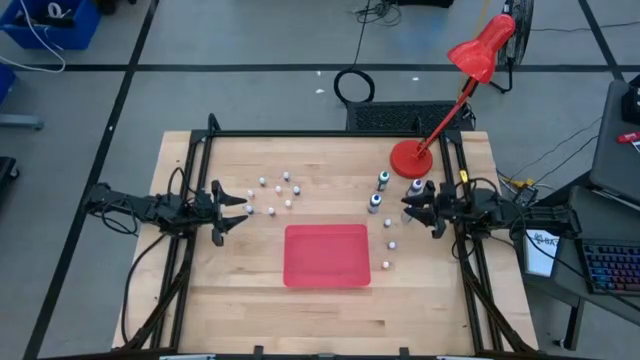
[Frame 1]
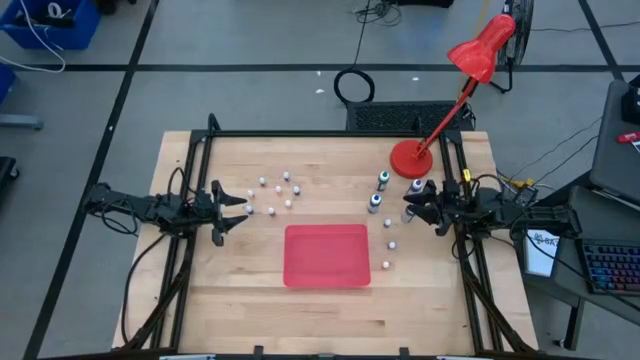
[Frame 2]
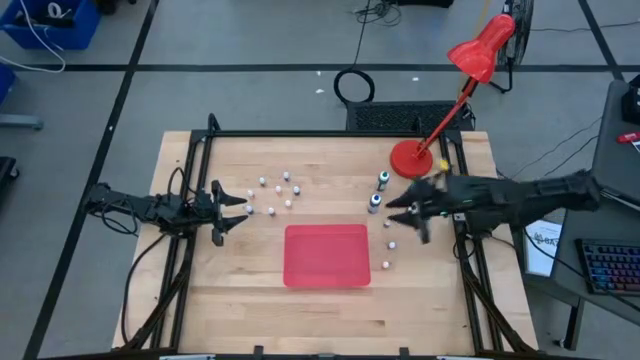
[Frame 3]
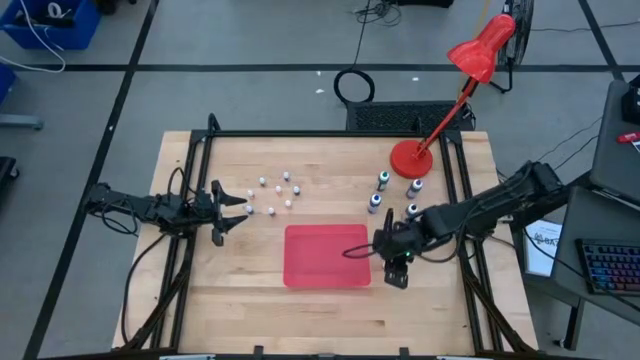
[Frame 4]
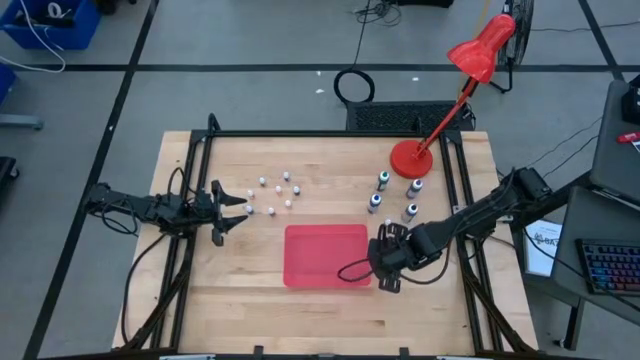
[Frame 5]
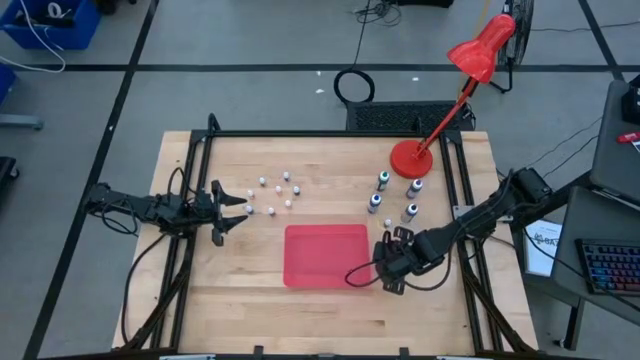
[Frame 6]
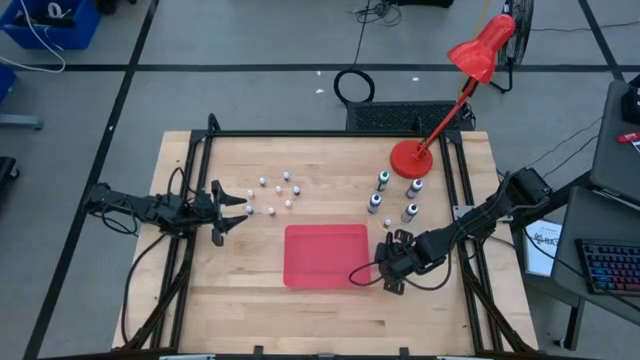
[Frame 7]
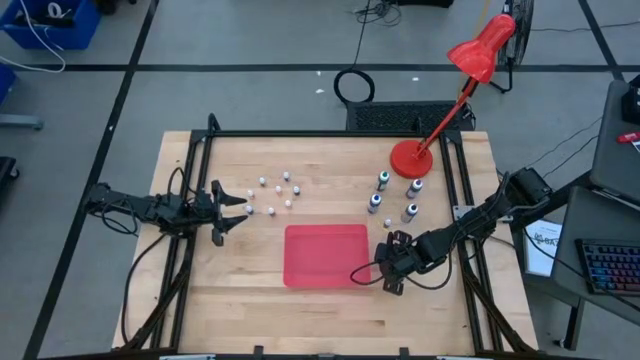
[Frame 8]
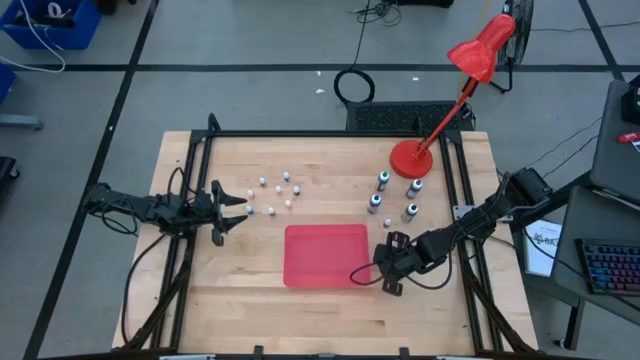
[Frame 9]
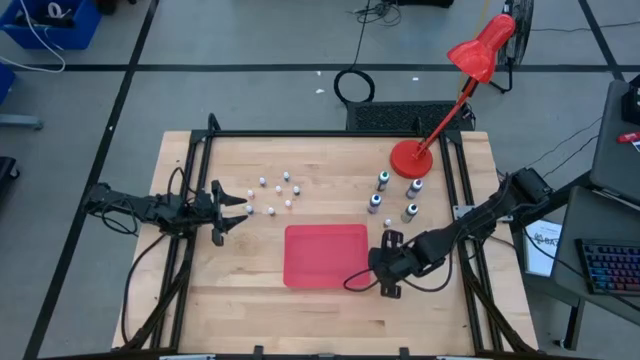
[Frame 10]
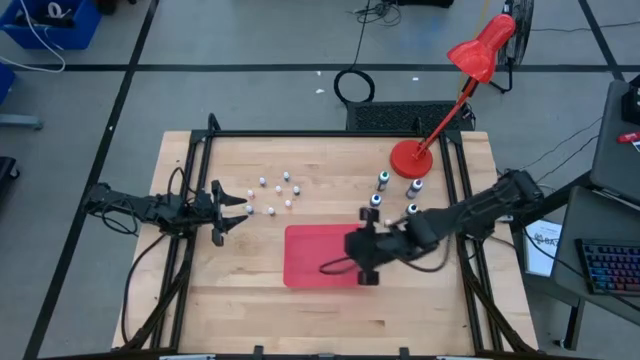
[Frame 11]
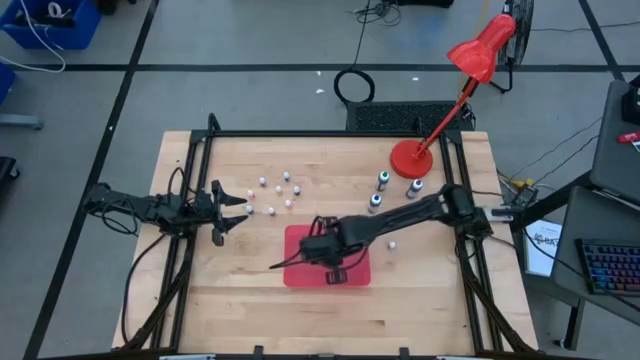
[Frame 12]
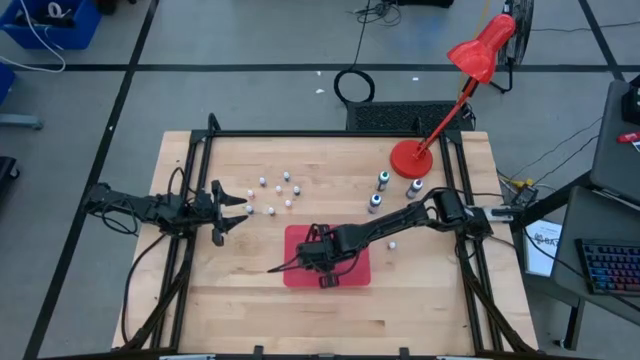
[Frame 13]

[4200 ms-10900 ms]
Task: Pick & Place food coloring
Put the small orange food coloring bottle into the bin

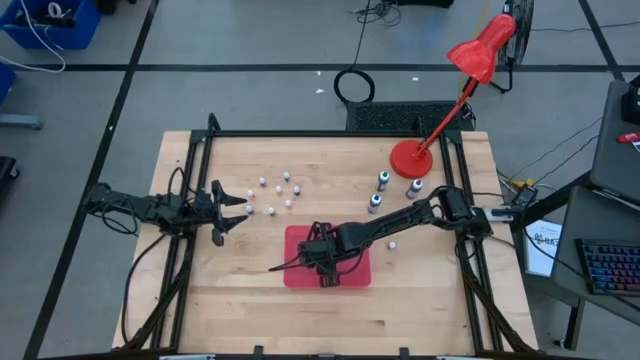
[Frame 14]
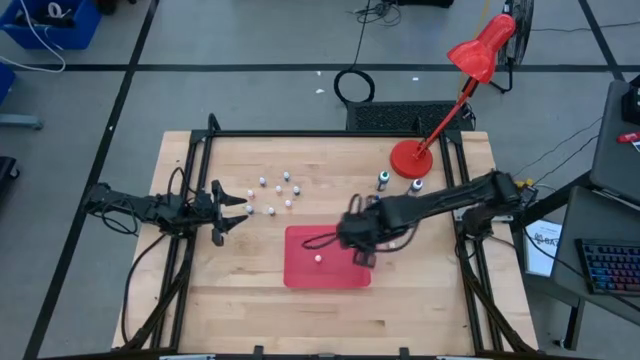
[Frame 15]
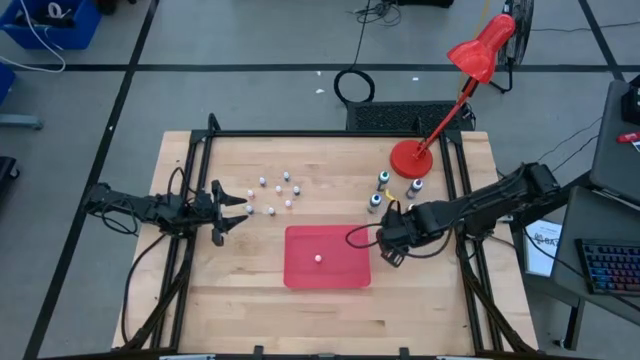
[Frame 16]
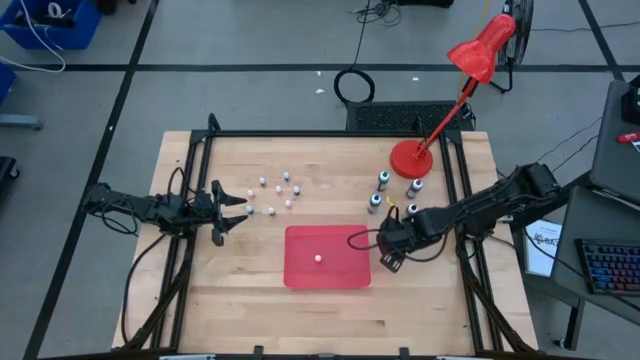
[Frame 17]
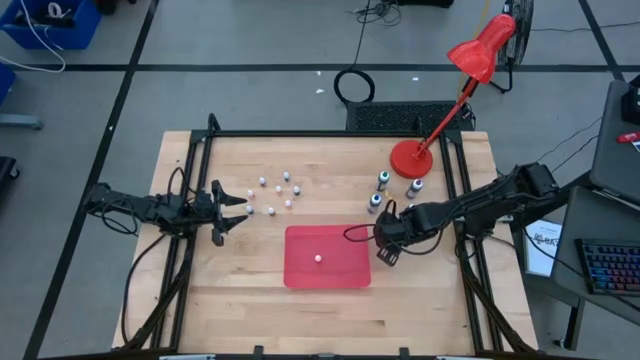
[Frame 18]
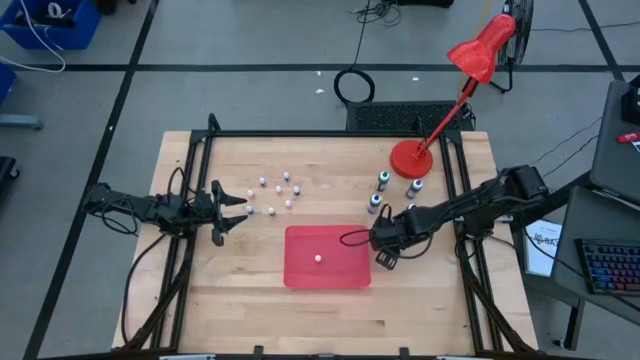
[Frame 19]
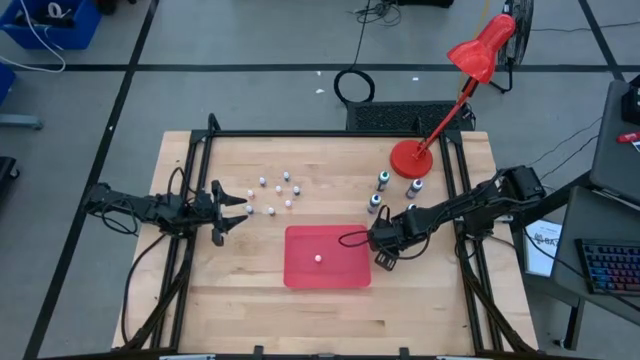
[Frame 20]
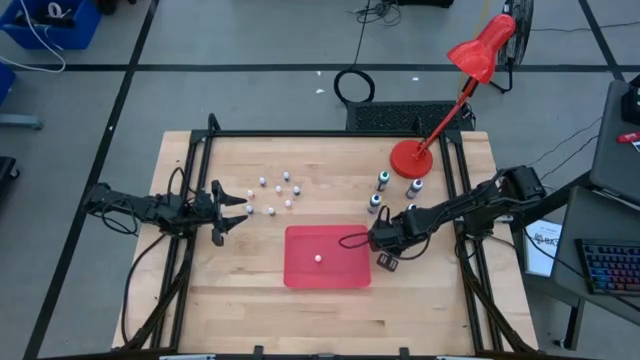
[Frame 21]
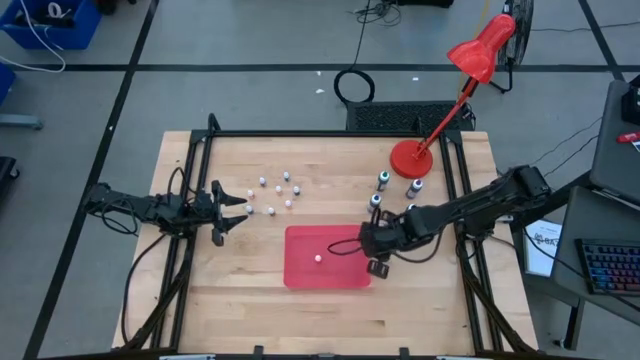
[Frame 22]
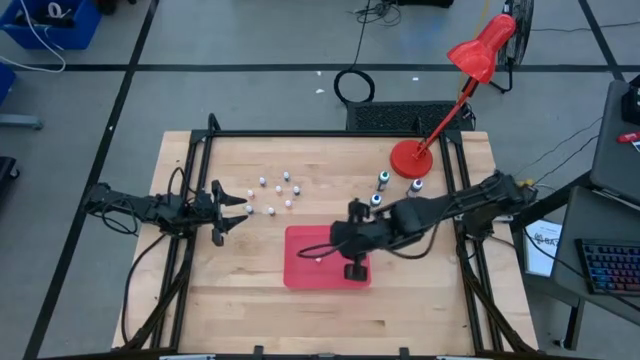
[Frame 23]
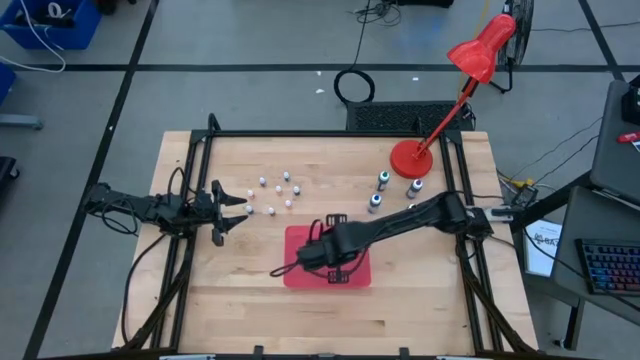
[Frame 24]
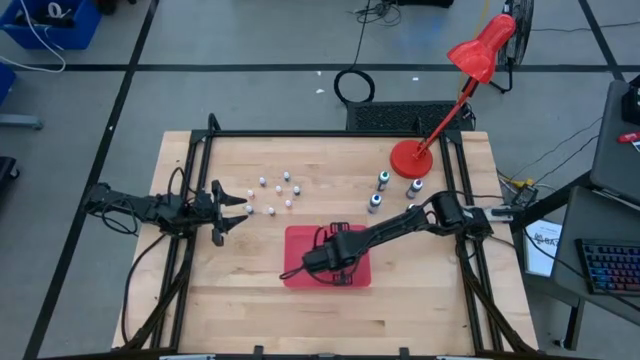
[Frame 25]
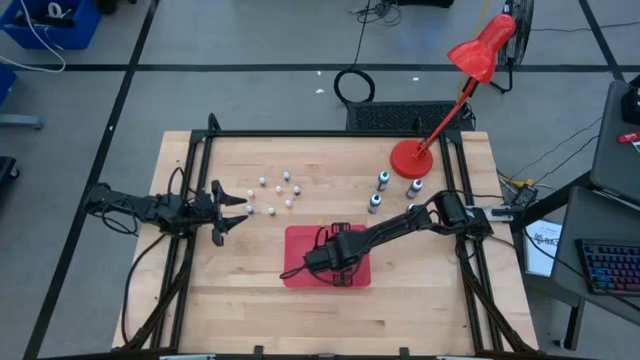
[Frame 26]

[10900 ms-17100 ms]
Put the small dark green food coloring bottle into the bin

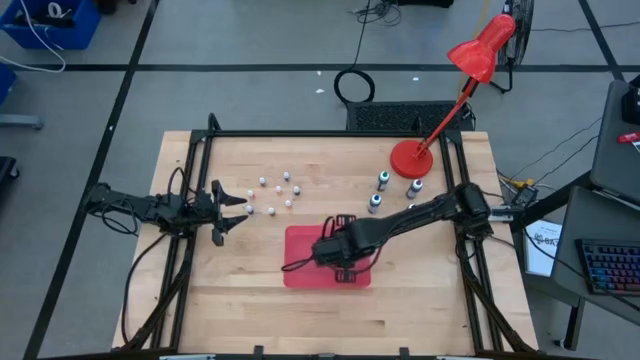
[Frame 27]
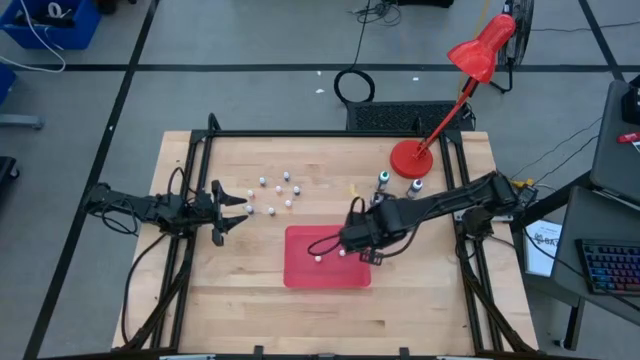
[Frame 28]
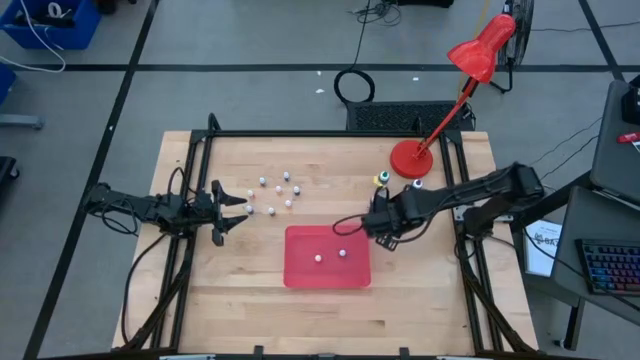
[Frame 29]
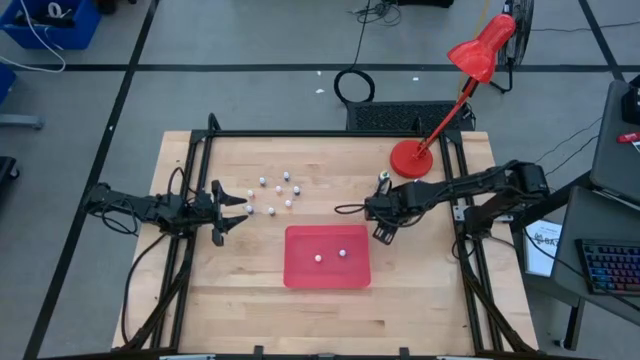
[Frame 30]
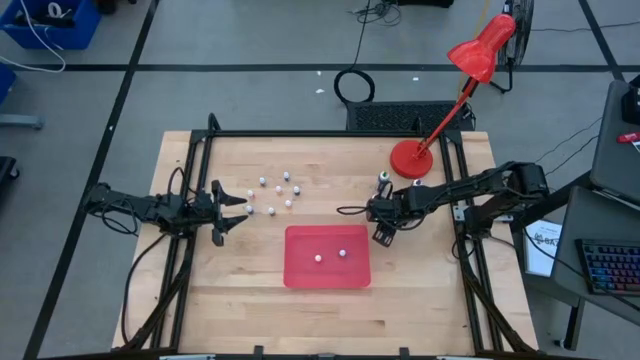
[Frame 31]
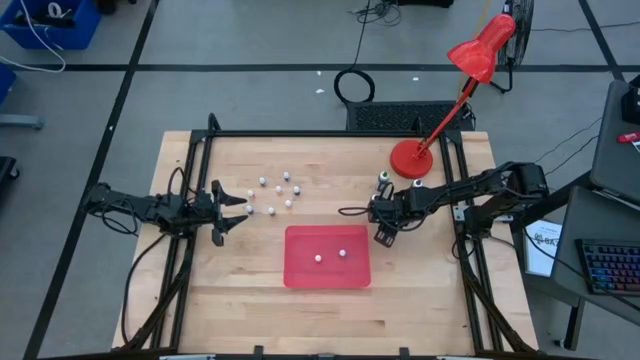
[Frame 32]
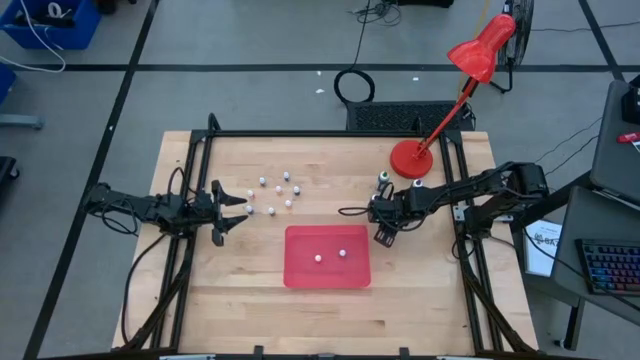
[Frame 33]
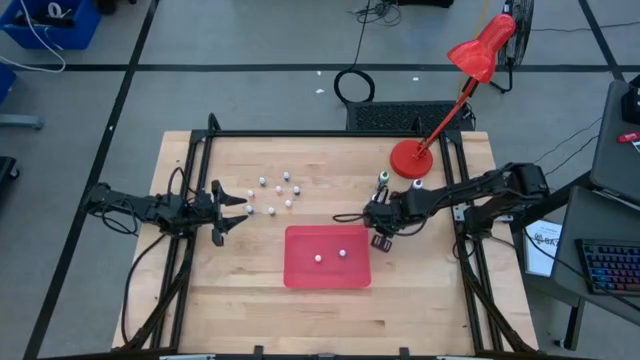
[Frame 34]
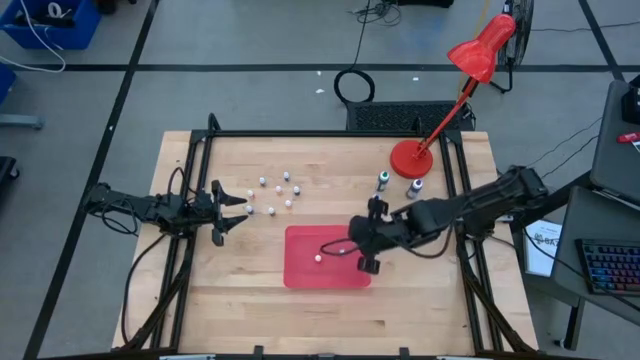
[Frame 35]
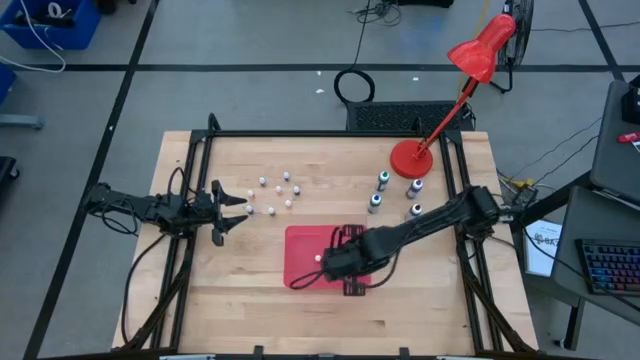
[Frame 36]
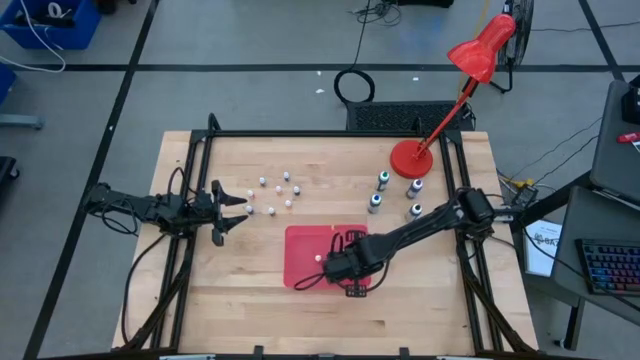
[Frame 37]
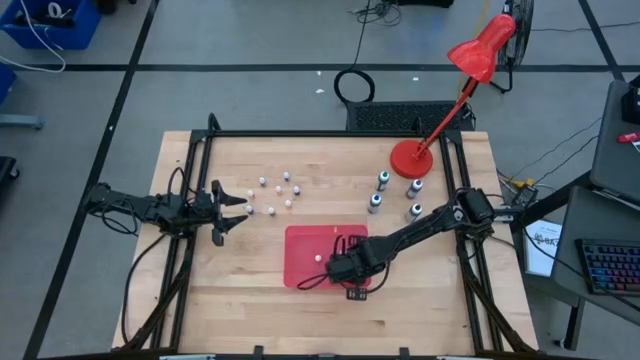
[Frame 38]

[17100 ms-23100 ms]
Put the small black food coloring bottle into the bin

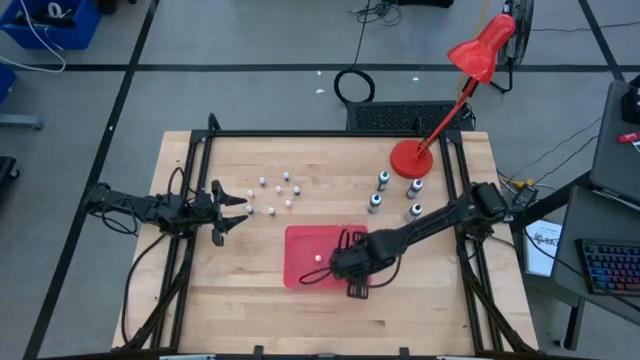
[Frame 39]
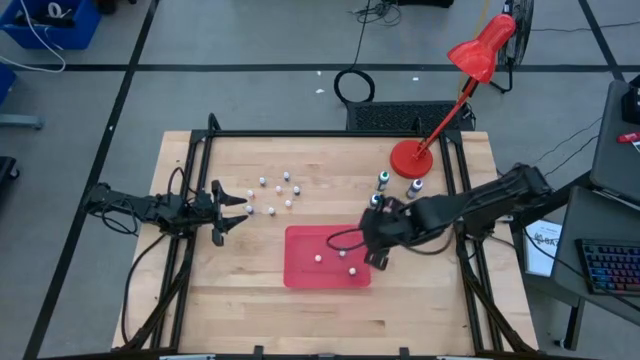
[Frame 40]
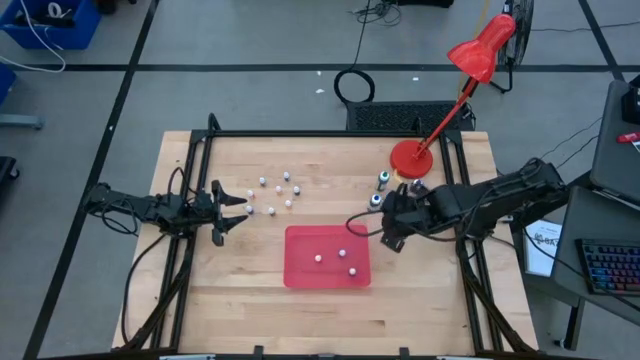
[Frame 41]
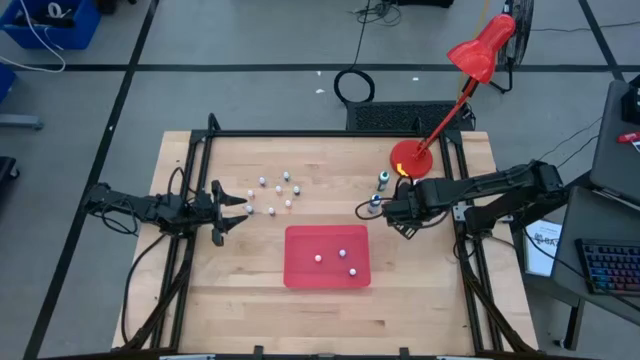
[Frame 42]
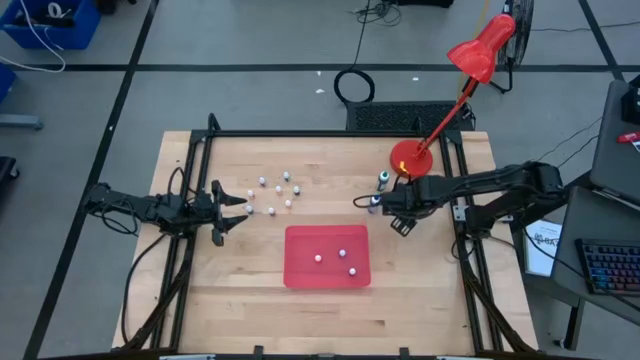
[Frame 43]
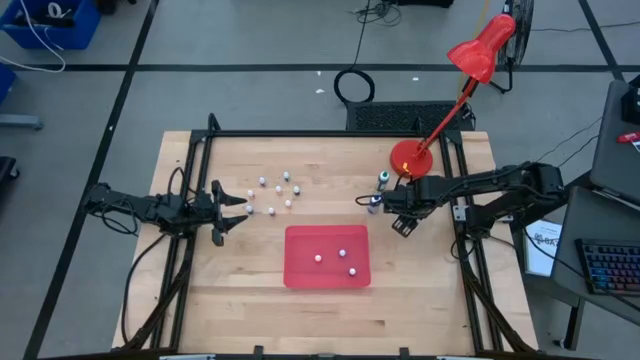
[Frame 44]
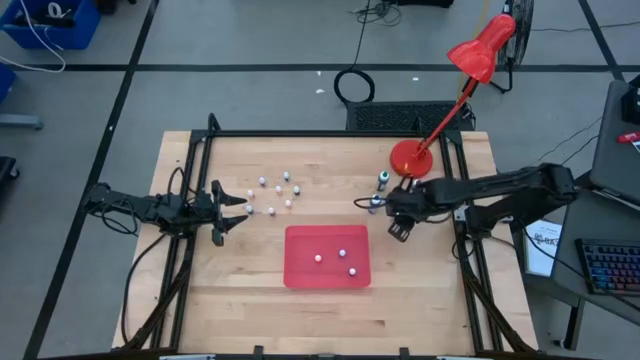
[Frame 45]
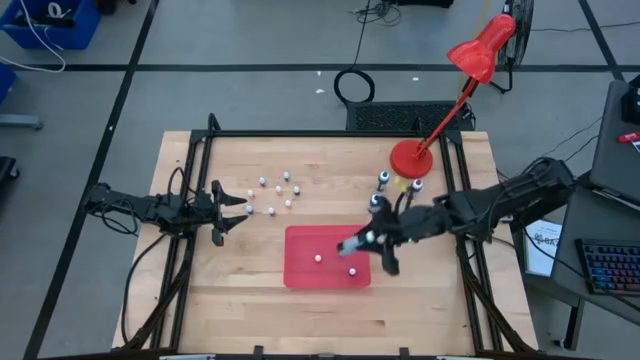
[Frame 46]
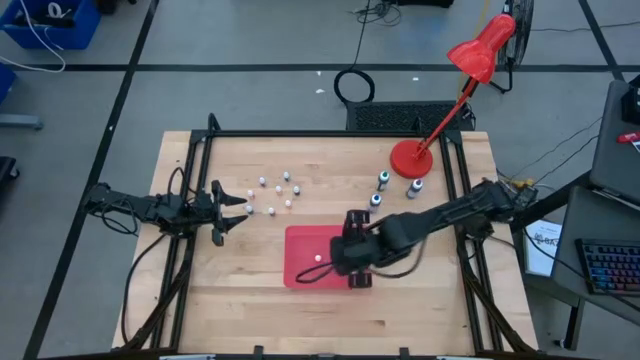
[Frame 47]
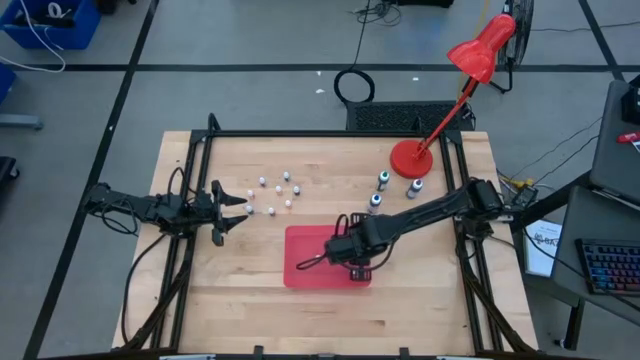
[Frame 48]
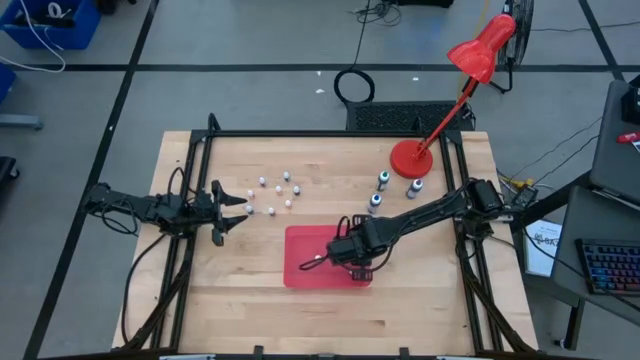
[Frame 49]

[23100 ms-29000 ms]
Put the large black food coloring bottle into the bin
